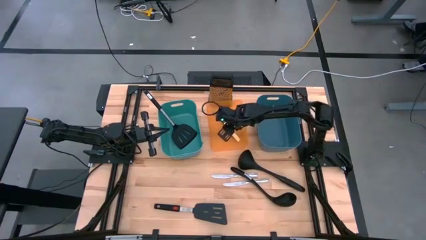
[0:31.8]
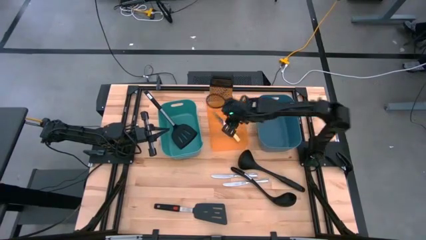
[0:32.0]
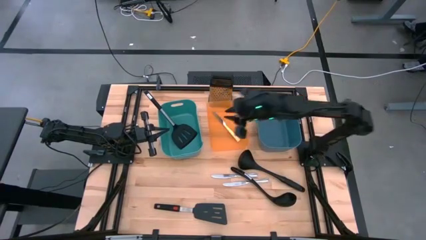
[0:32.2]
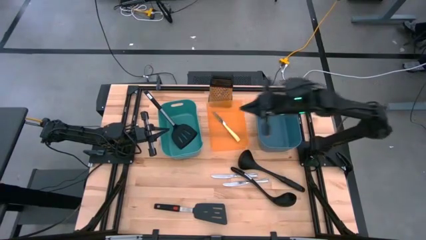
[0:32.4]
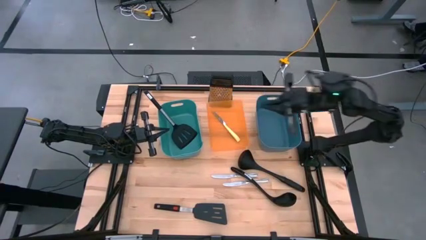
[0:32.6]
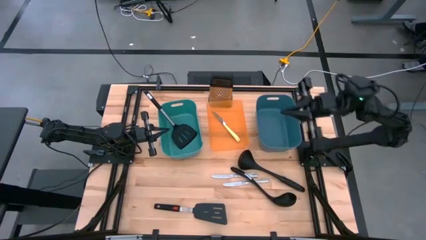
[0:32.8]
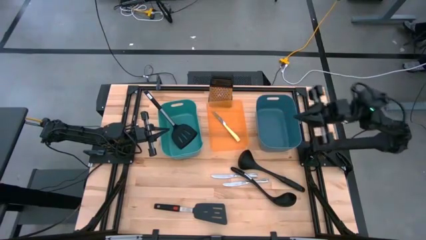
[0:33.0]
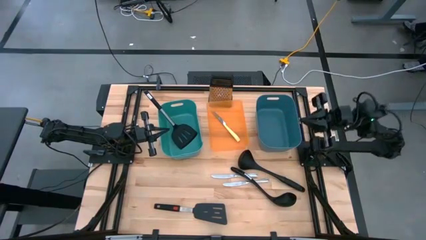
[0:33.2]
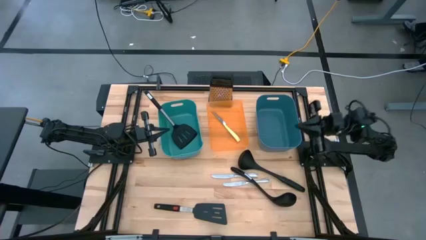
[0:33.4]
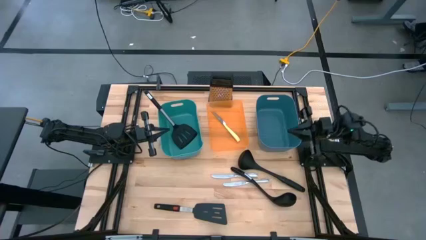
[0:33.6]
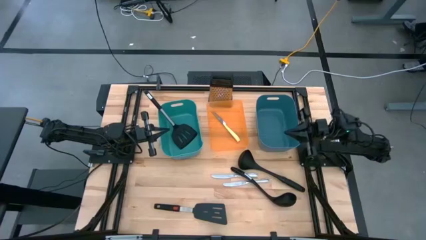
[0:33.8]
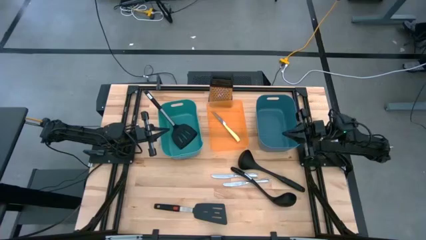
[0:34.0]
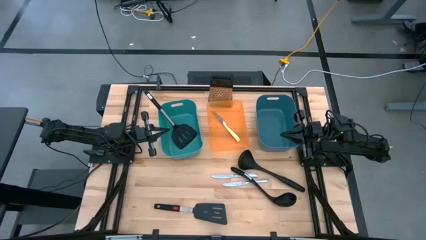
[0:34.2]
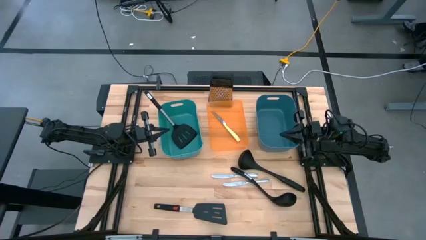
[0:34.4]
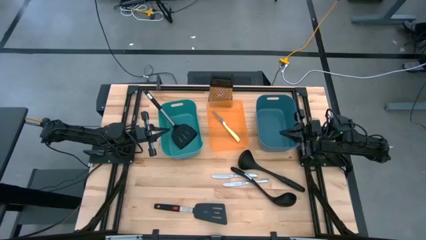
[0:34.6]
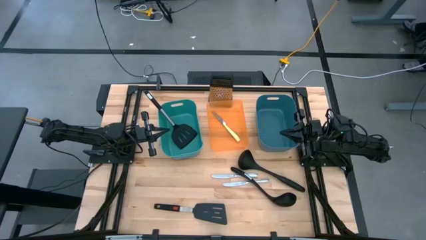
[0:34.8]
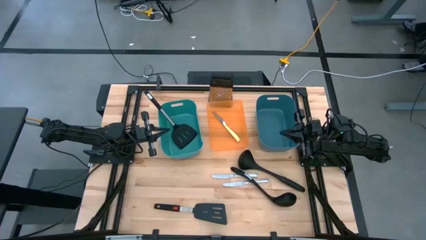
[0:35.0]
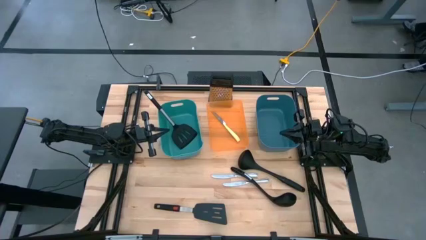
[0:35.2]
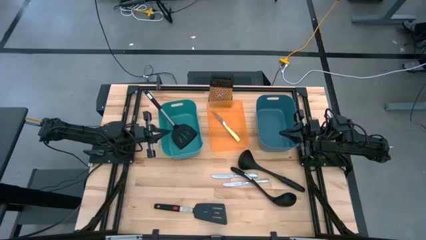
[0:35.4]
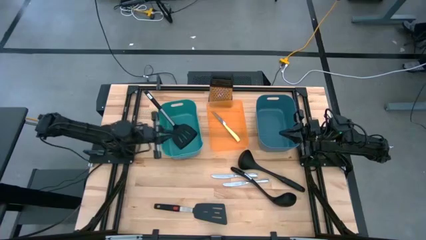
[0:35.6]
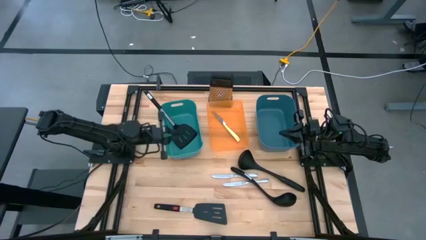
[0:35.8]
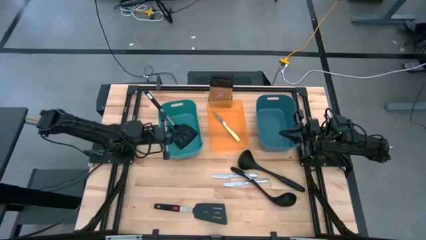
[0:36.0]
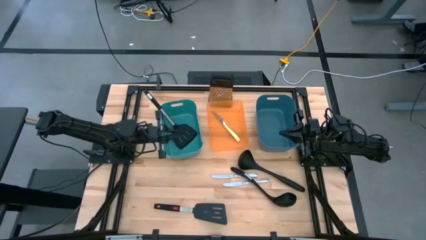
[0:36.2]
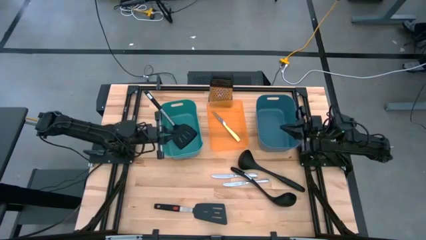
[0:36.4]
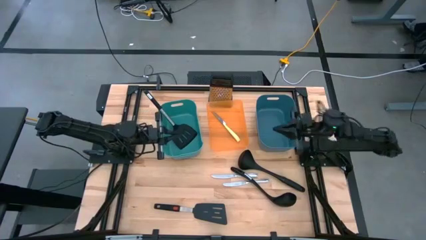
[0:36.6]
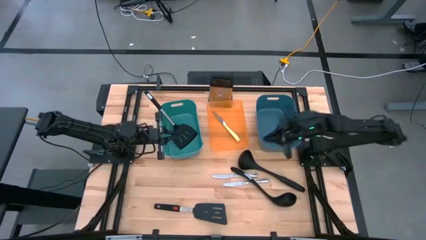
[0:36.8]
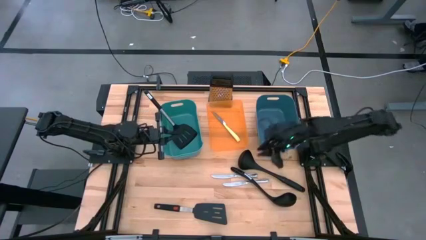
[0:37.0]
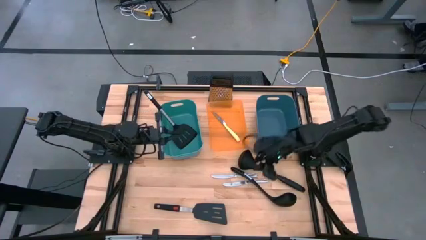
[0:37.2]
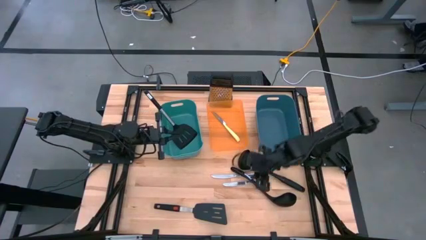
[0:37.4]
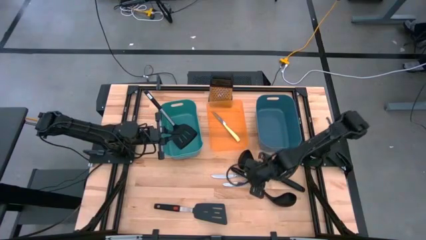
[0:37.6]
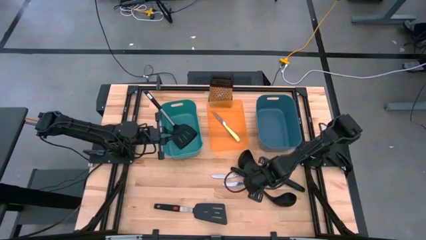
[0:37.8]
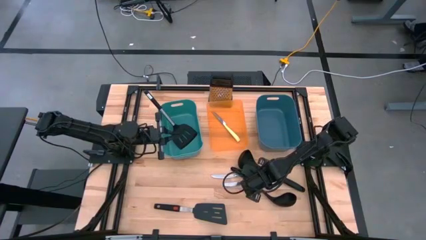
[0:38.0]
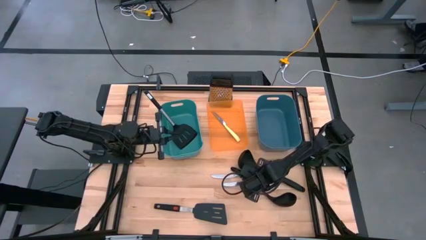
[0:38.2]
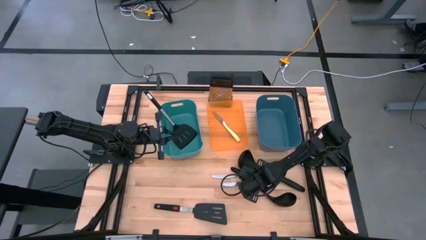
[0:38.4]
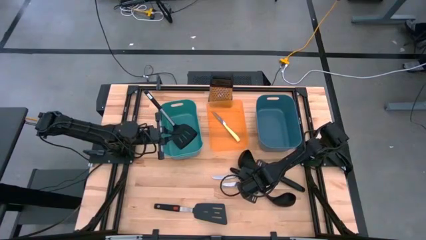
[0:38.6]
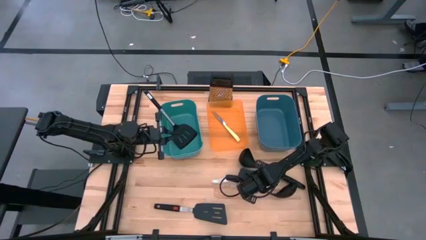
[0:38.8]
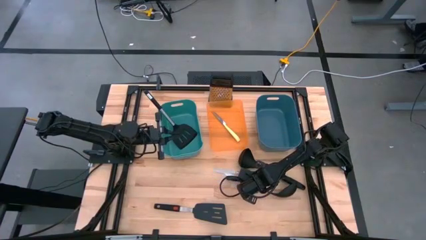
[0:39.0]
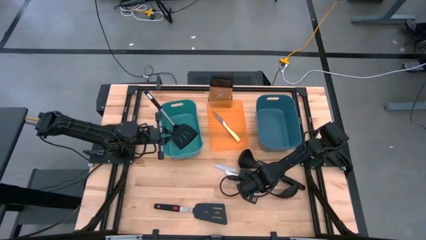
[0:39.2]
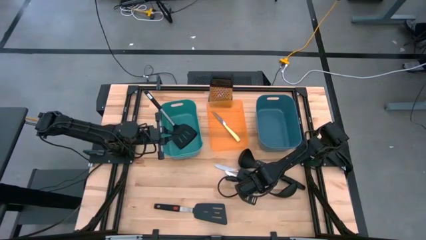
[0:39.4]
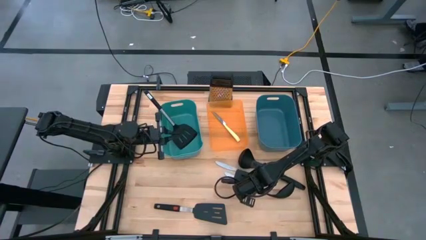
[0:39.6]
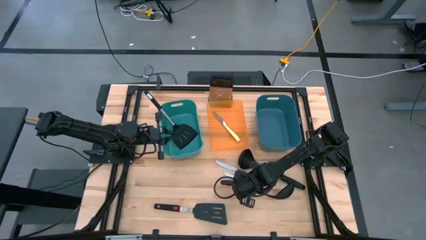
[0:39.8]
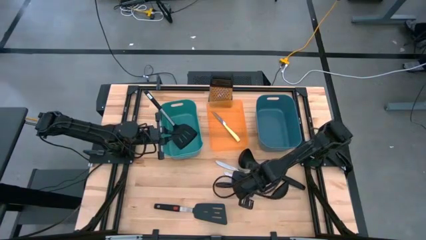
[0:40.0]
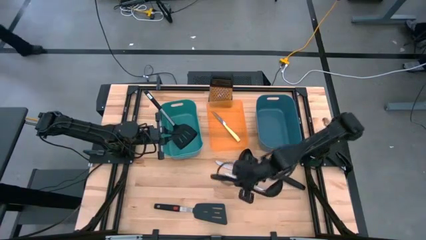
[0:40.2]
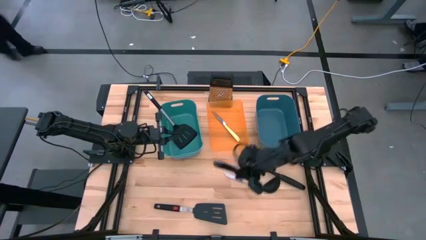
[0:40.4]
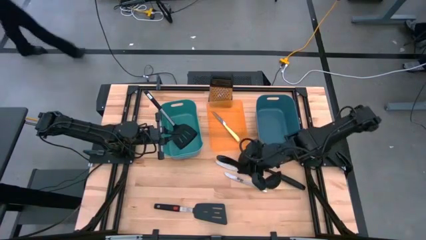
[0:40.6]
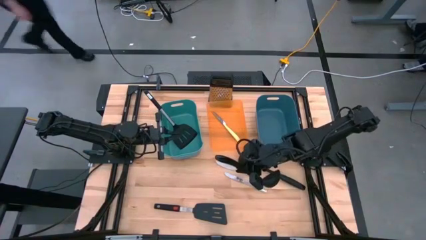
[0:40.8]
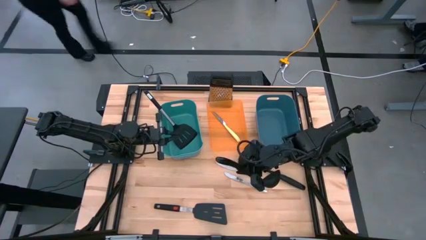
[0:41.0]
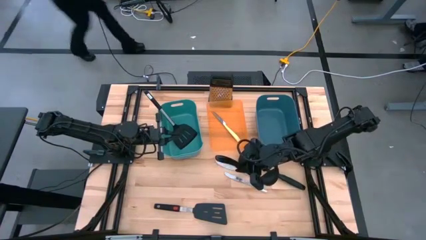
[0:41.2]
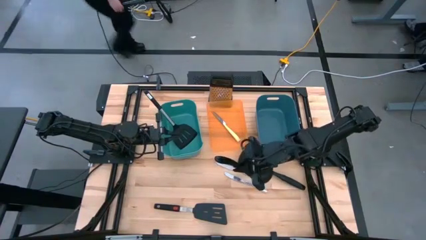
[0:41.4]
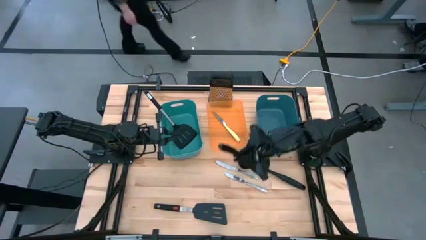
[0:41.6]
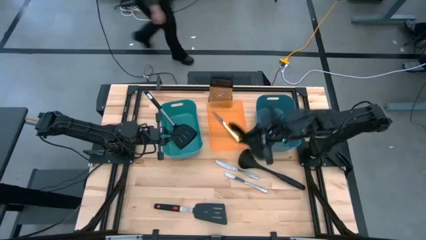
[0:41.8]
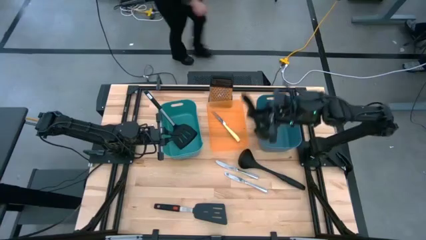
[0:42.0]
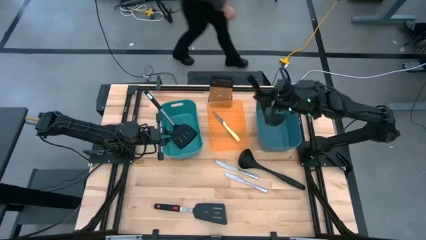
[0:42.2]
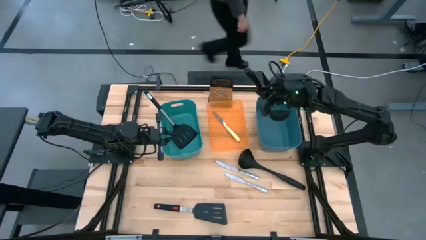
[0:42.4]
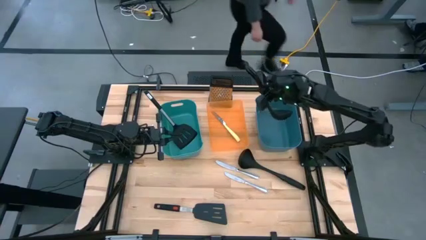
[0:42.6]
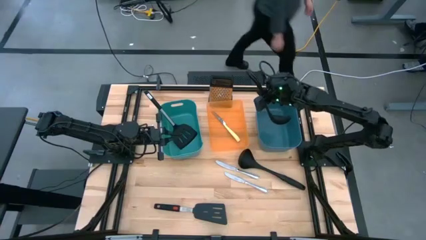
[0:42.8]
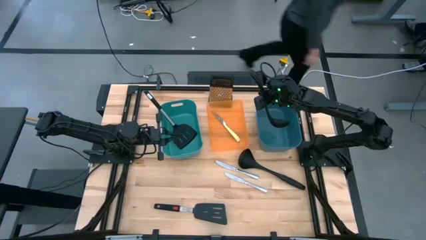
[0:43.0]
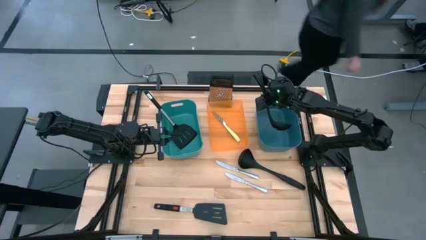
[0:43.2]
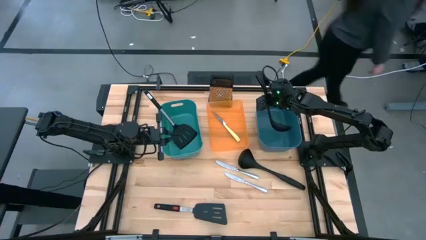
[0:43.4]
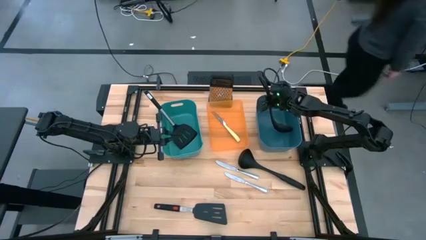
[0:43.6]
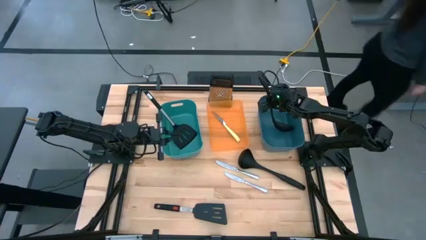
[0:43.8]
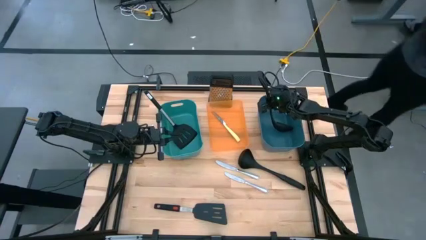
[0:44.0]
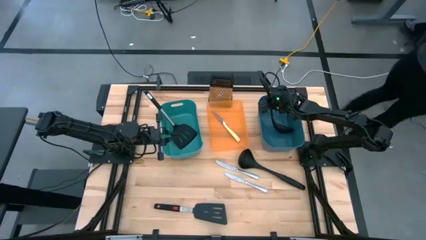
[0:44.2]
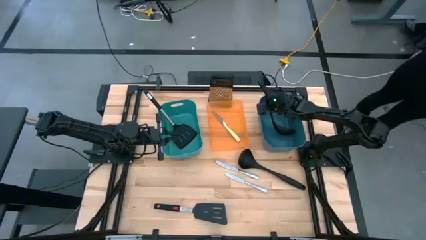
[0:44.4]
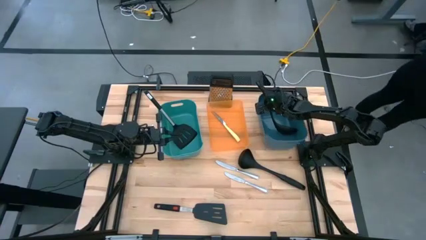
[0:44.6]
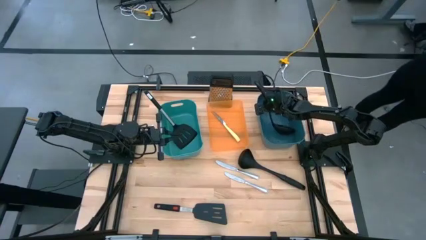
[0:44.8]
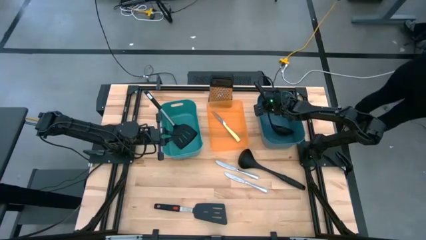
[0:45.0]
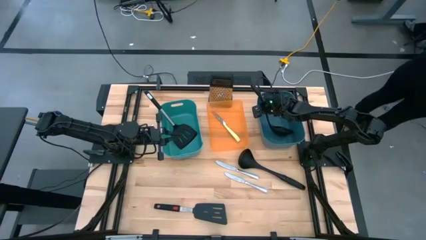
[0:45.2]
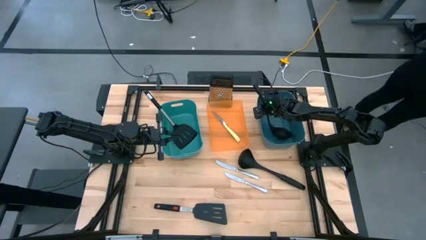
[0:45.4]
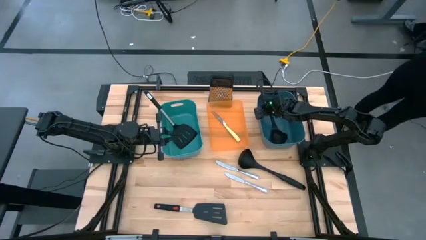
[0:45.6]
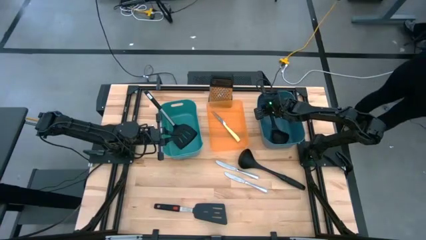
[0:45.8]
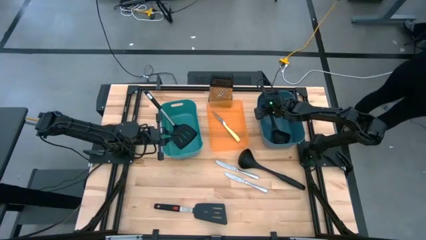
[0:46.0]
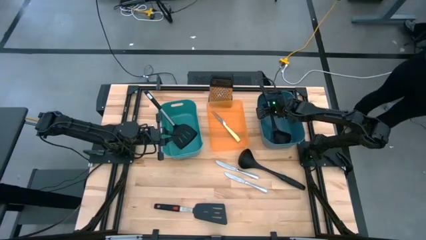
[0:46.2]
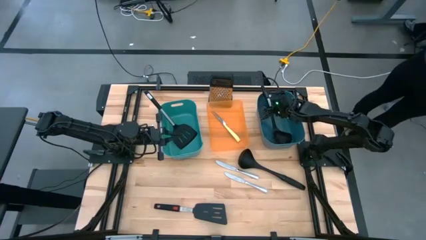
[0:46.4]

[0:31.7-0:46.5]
Task: Pick & Place Kitchen Items
Put the black serving spoon into the blue bin
